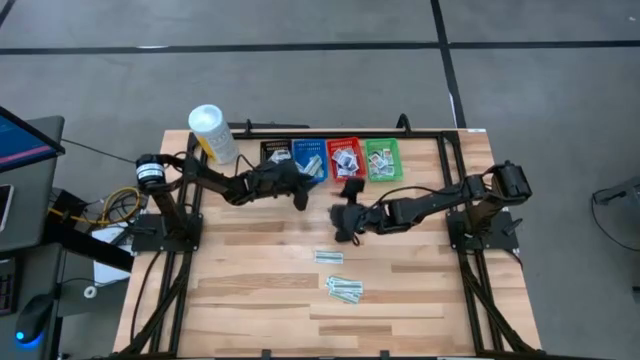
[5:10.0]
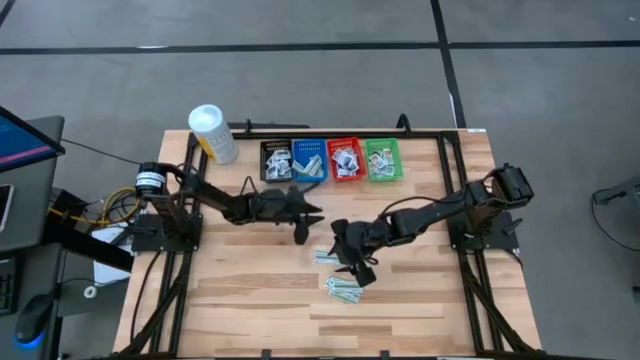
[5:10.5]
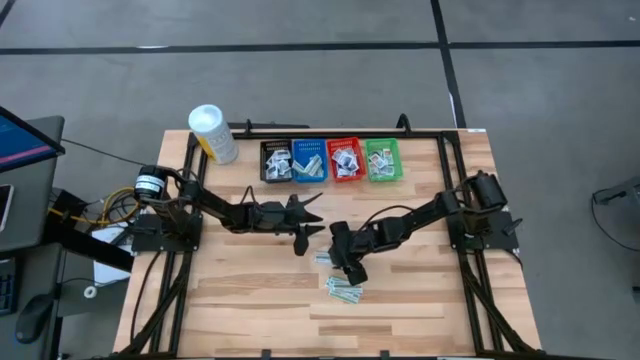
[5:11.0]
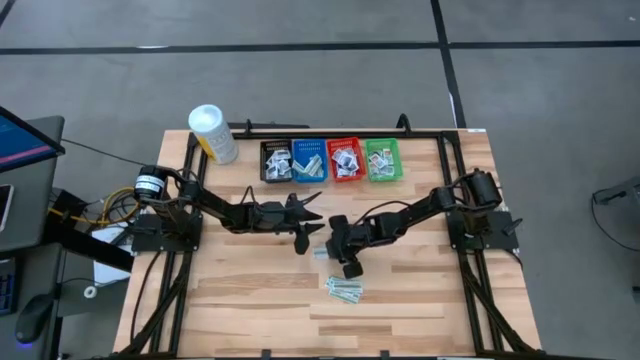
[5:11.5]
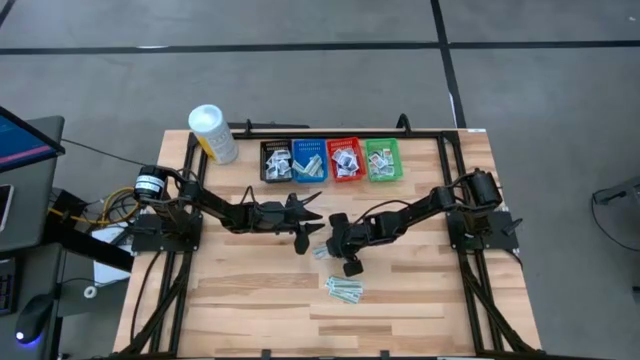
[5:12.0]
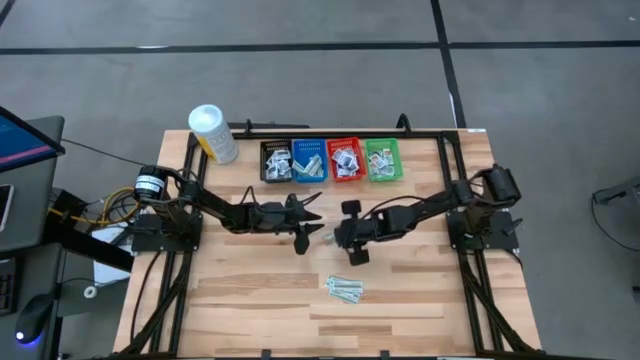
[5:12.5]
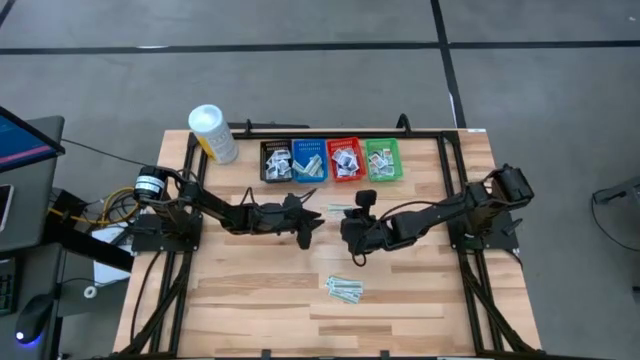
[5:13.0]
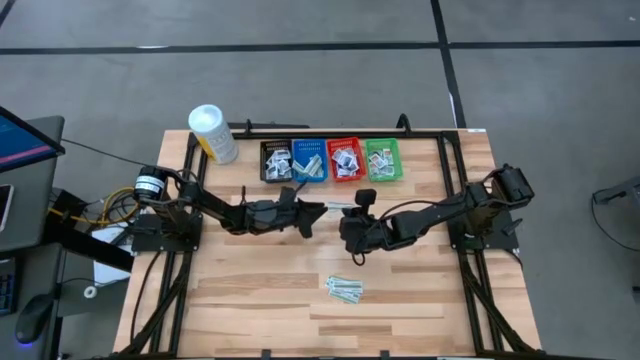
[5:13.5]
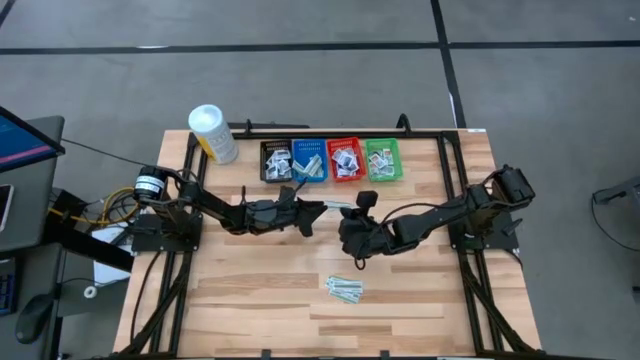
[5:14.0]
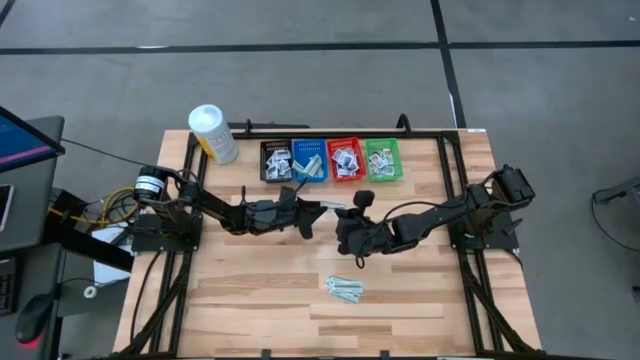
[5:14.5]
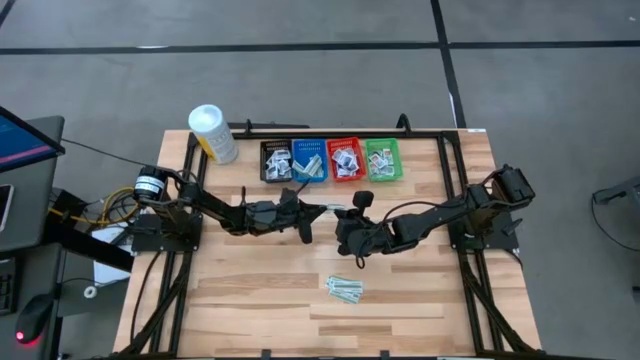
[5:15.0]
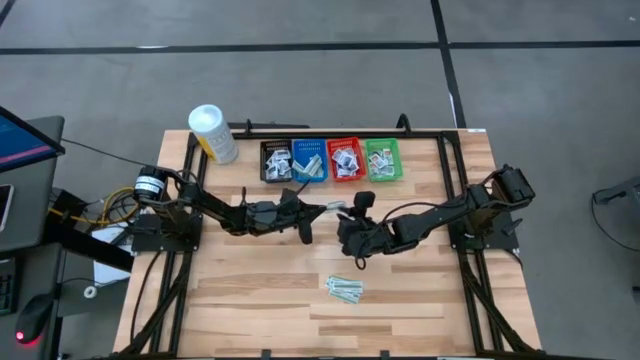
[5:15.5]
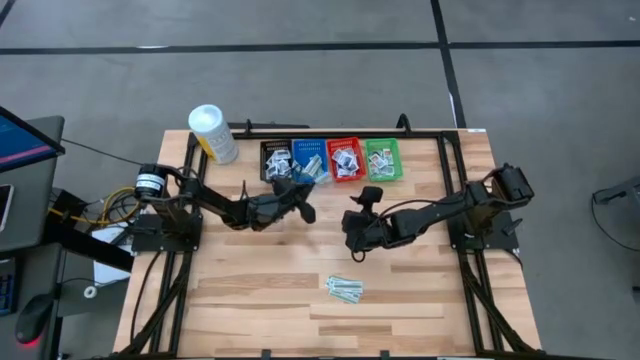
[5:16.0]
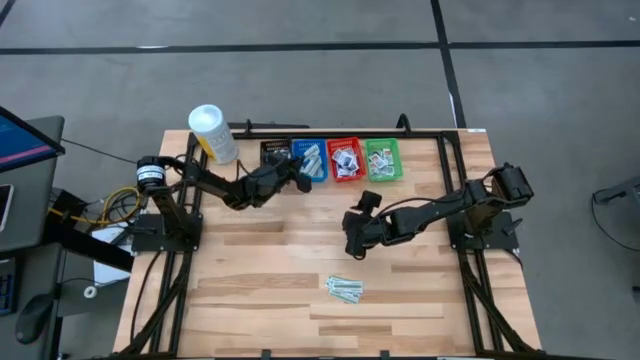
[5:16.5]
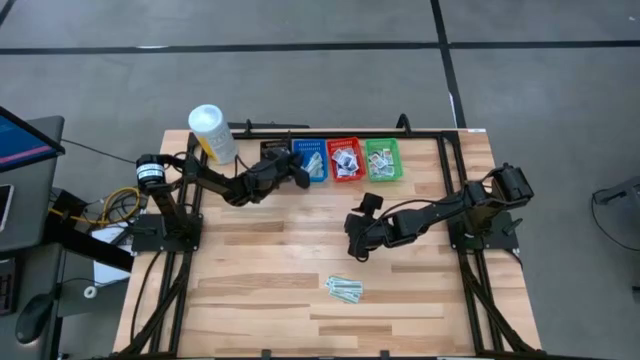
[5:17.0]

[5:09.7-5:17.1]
Task: Pick & Place First Aid Supplies
Put the green pad into the blue bin

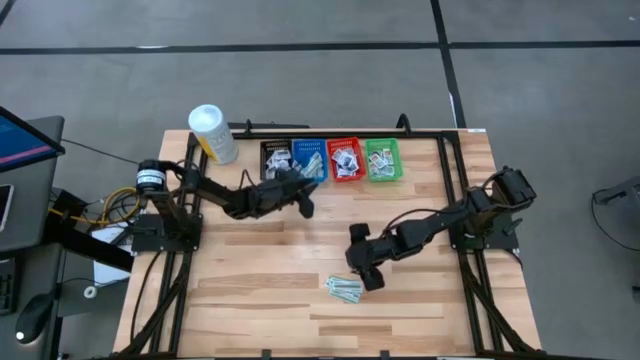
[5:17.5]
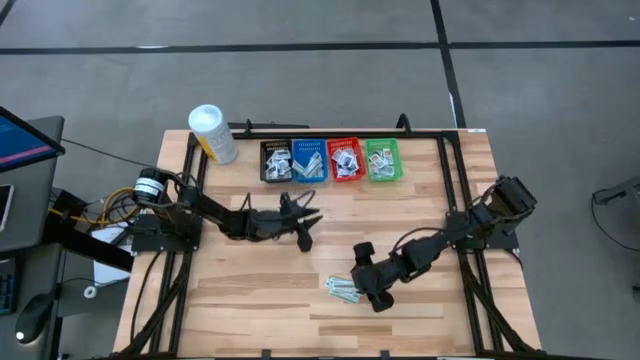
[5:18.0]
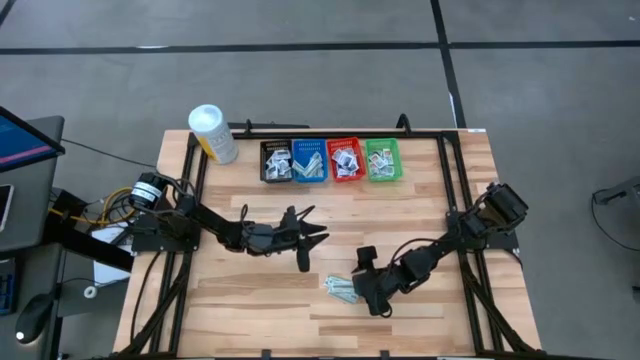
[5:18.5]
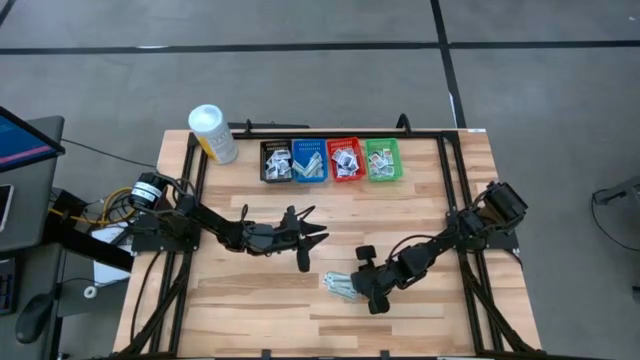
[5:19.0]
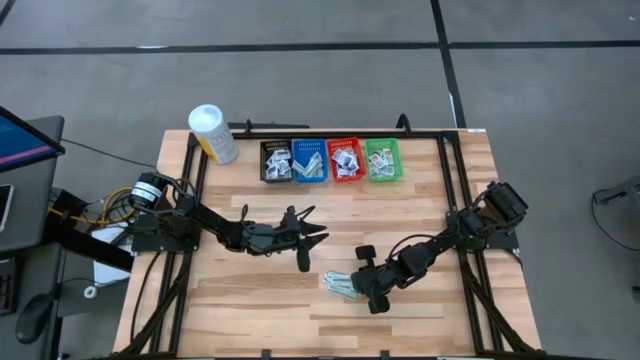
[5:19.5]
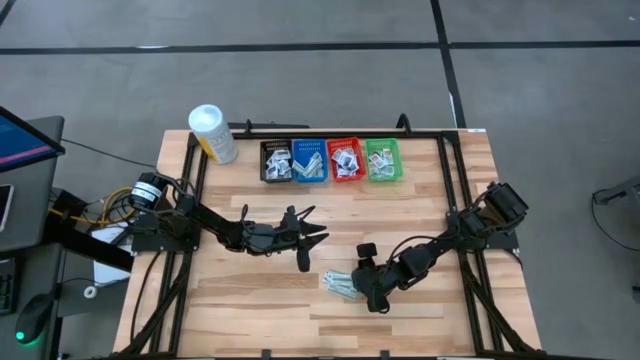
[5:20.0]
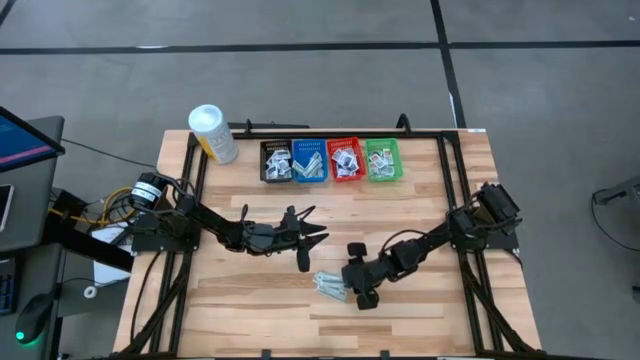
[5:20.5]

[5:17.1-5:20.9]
Put the green pad into the blue bin

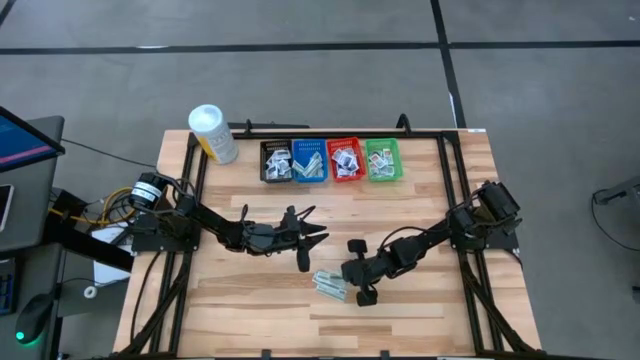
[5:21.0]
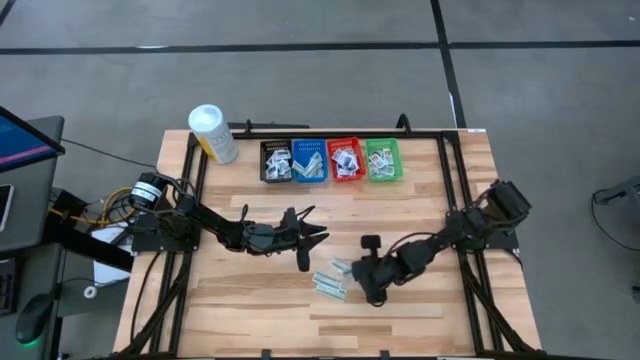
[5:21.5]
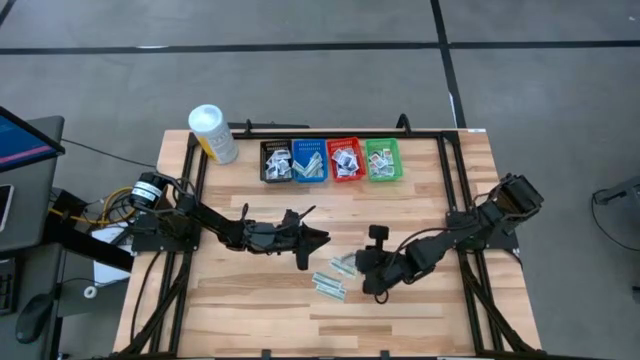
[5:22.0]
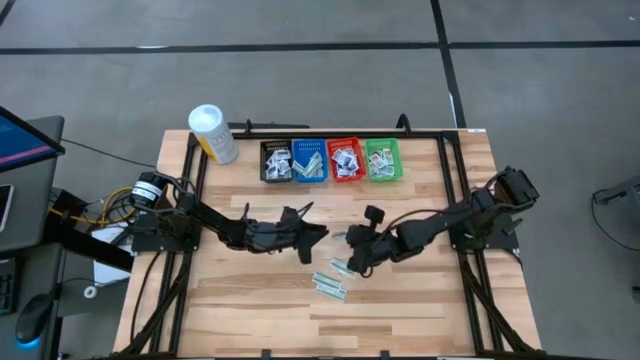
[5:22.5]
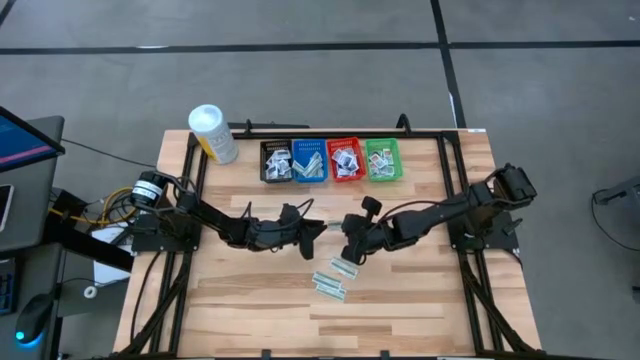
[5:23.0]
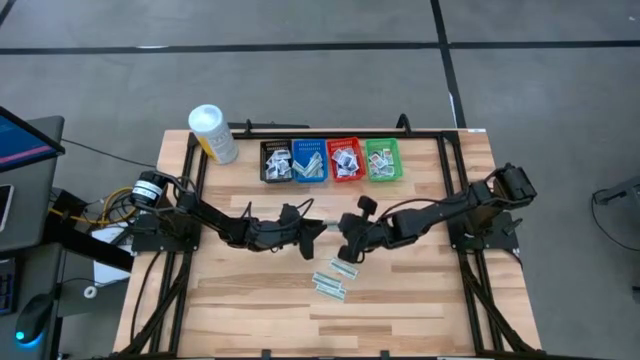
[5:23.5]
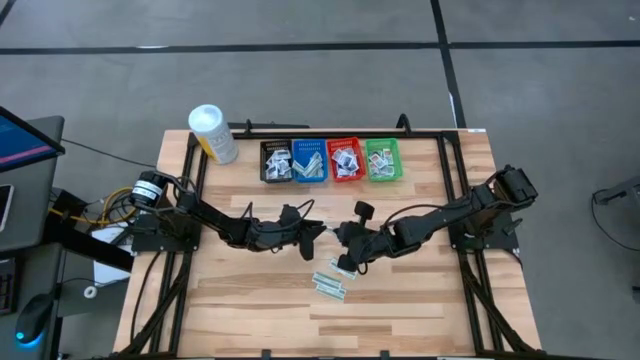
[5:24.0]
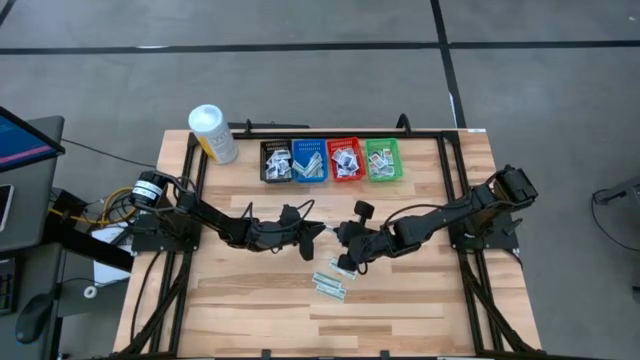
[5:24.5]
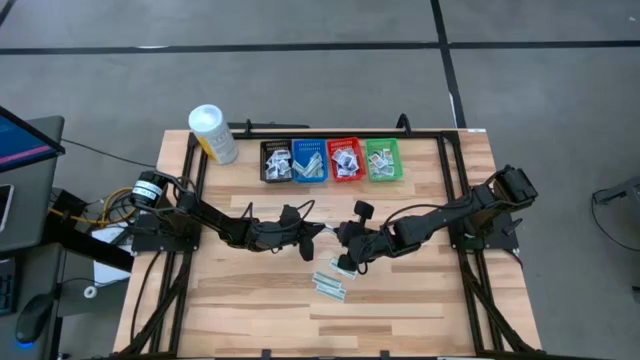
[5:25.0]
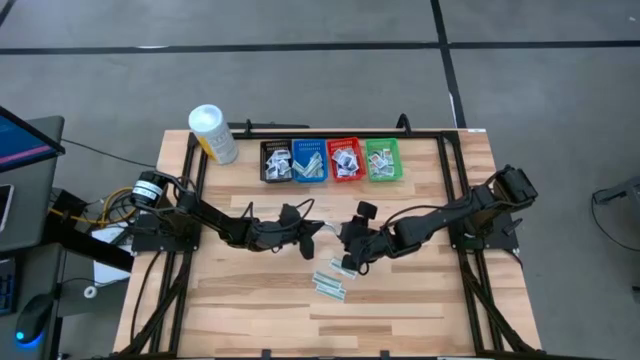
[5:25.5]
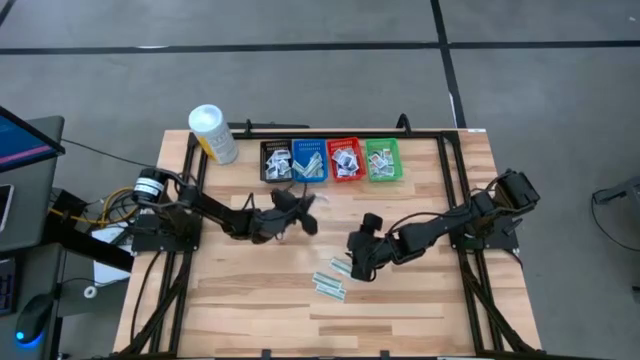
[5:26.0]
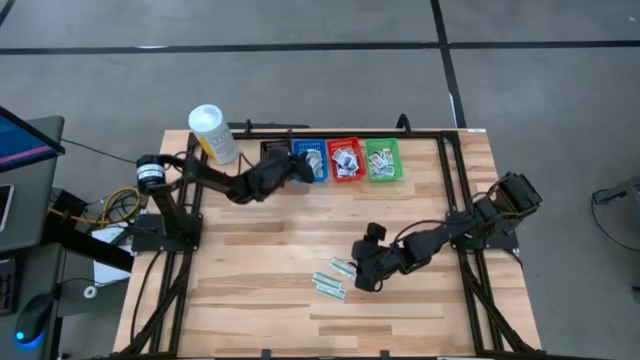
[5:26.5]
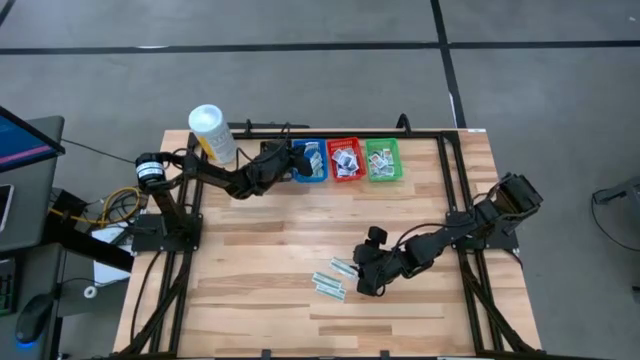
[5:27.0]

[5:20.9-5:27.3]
Put the green pad into the blue bin
